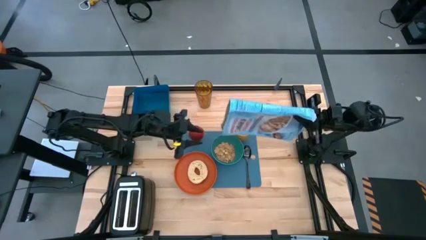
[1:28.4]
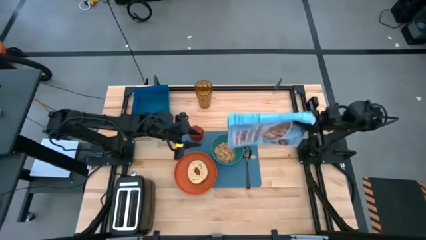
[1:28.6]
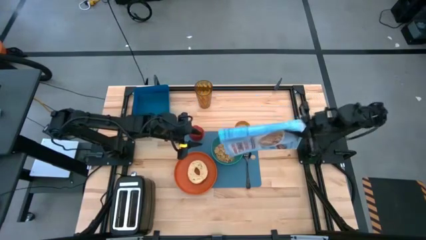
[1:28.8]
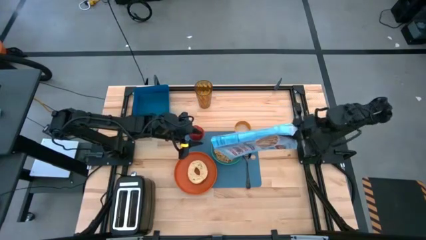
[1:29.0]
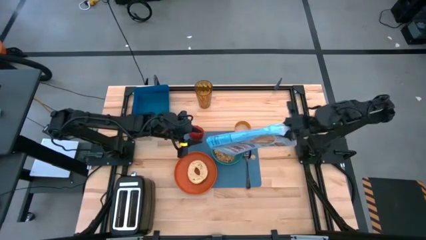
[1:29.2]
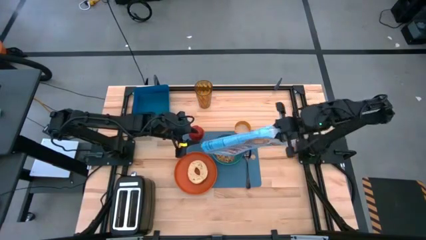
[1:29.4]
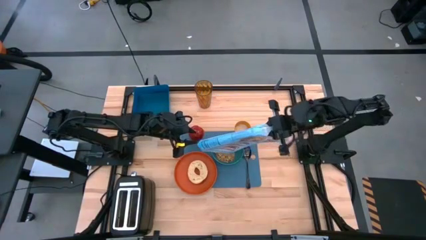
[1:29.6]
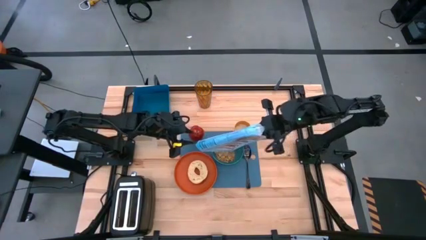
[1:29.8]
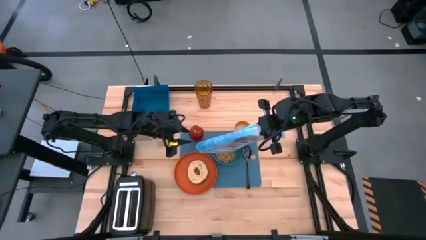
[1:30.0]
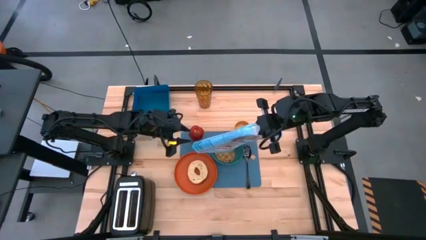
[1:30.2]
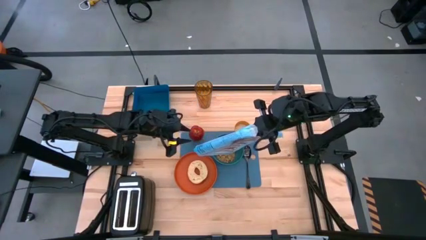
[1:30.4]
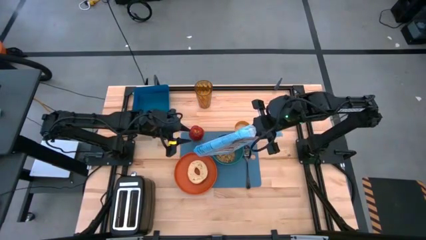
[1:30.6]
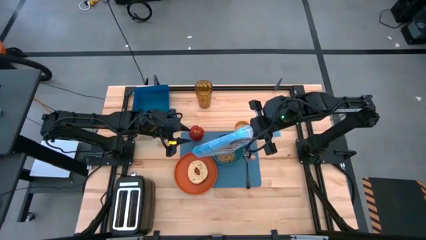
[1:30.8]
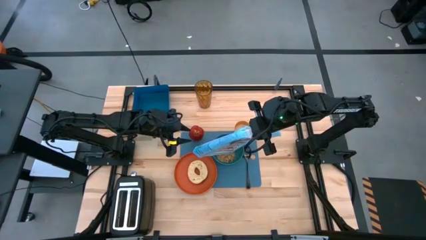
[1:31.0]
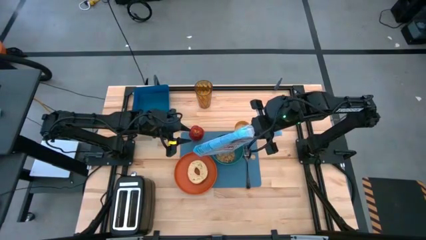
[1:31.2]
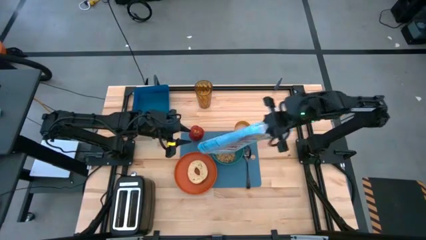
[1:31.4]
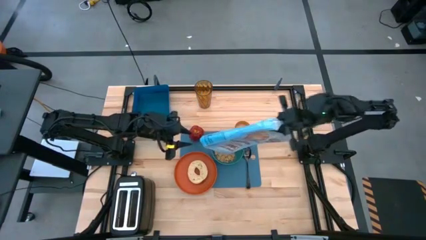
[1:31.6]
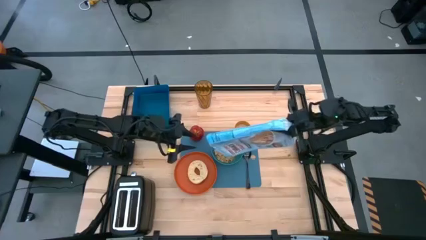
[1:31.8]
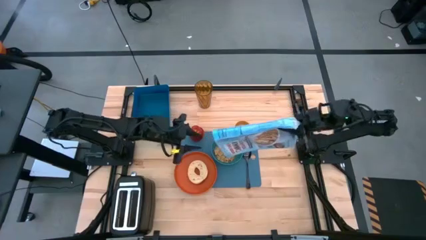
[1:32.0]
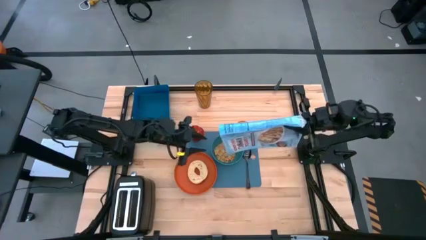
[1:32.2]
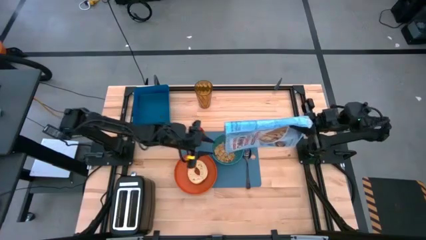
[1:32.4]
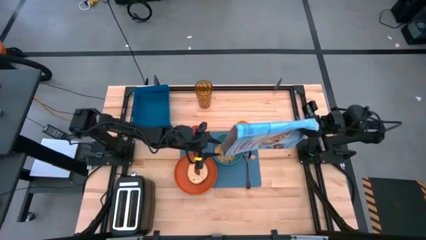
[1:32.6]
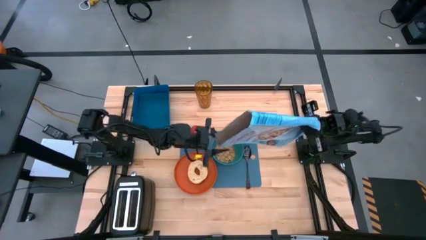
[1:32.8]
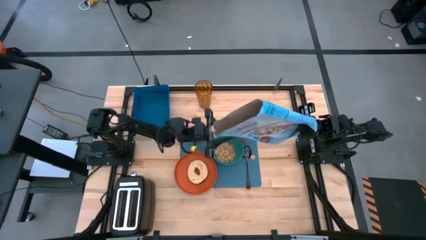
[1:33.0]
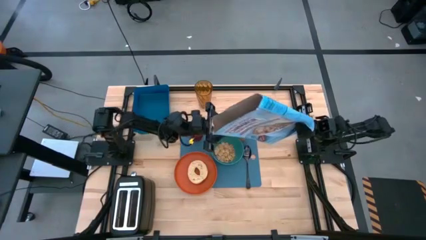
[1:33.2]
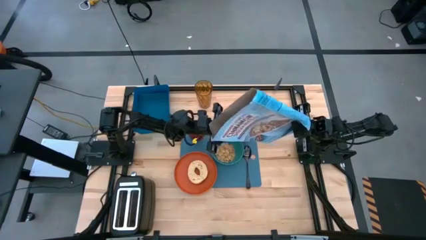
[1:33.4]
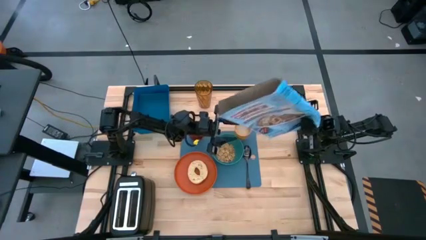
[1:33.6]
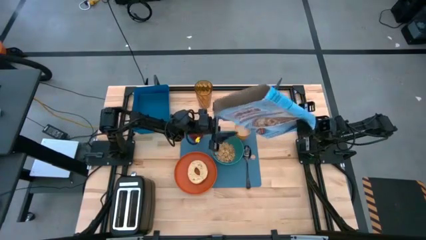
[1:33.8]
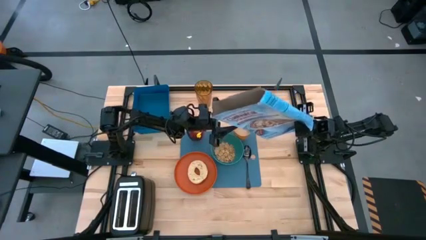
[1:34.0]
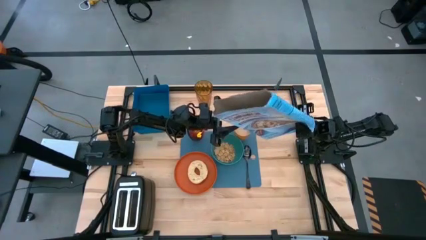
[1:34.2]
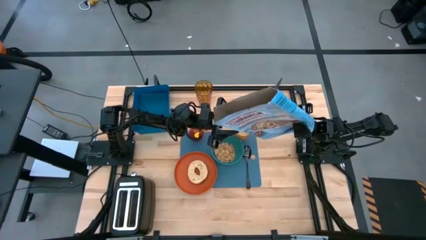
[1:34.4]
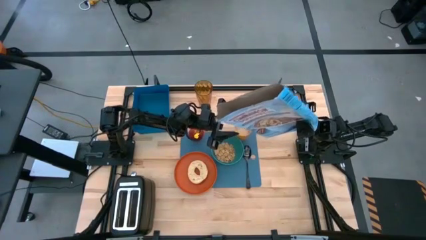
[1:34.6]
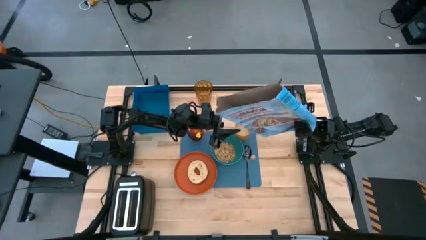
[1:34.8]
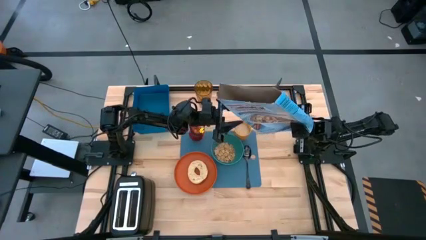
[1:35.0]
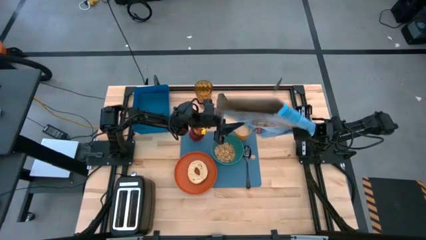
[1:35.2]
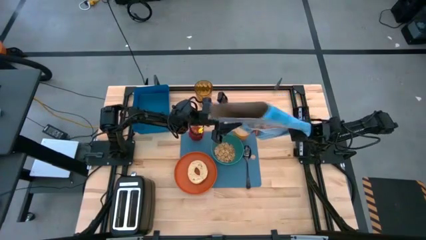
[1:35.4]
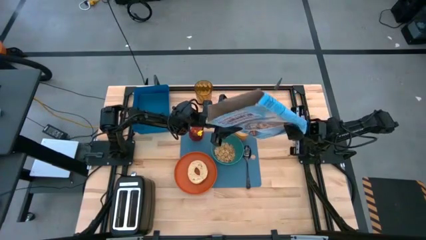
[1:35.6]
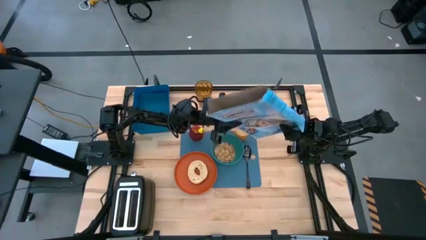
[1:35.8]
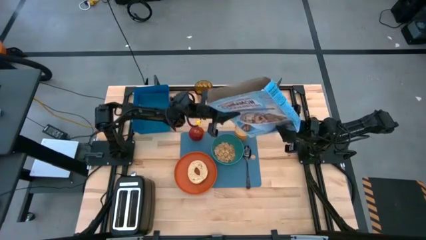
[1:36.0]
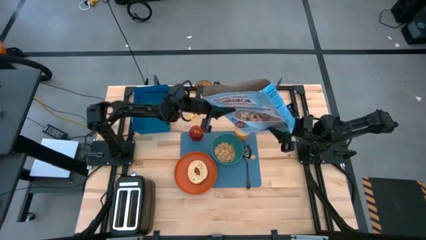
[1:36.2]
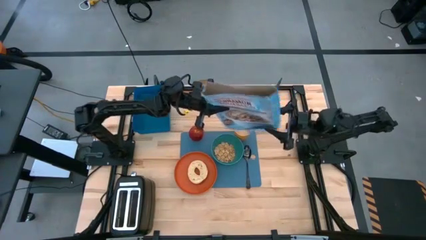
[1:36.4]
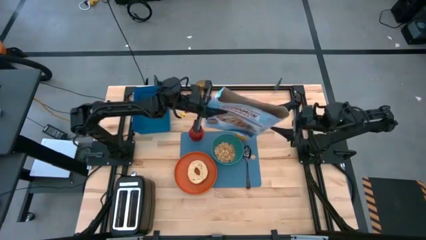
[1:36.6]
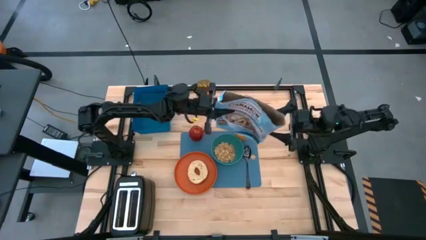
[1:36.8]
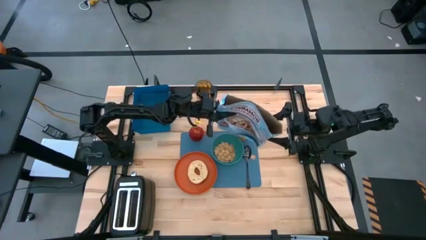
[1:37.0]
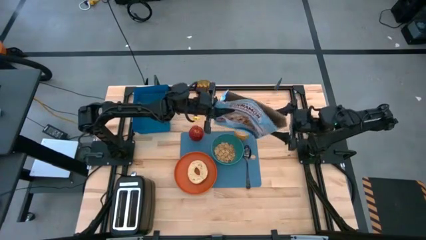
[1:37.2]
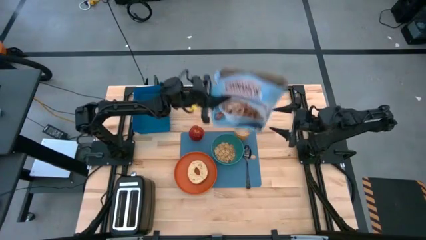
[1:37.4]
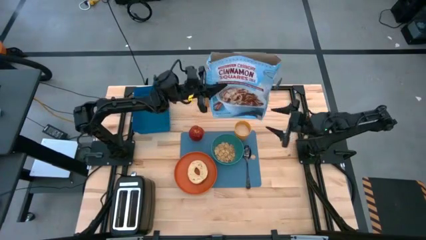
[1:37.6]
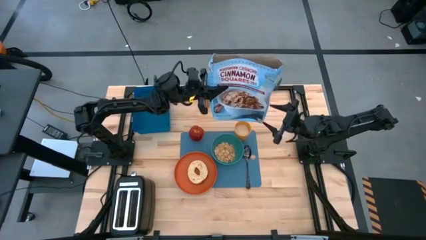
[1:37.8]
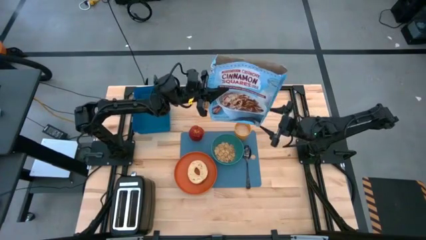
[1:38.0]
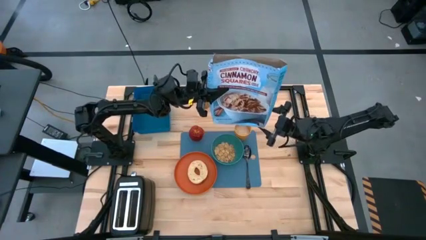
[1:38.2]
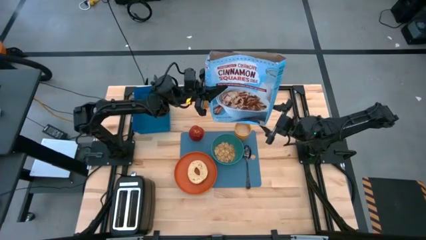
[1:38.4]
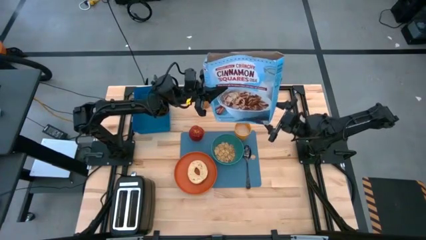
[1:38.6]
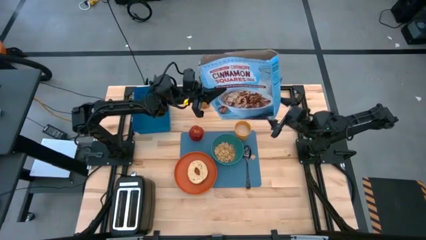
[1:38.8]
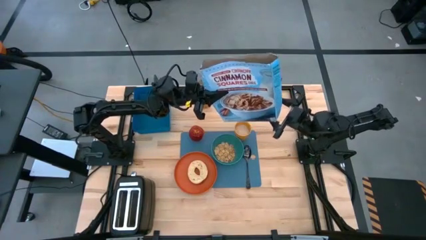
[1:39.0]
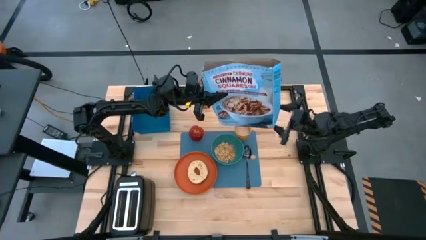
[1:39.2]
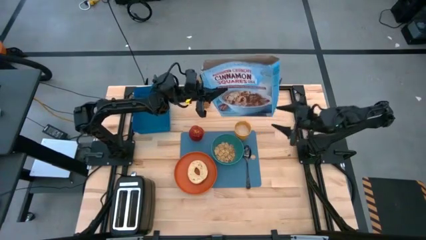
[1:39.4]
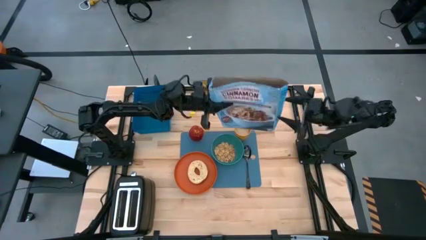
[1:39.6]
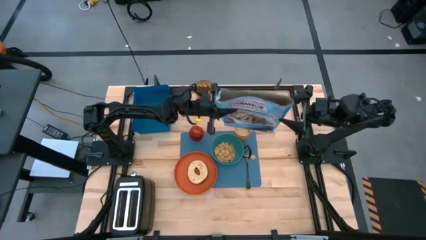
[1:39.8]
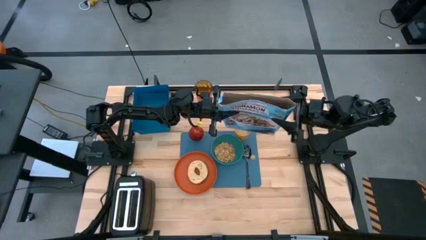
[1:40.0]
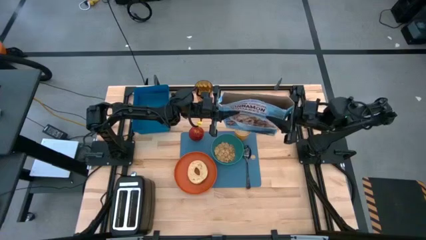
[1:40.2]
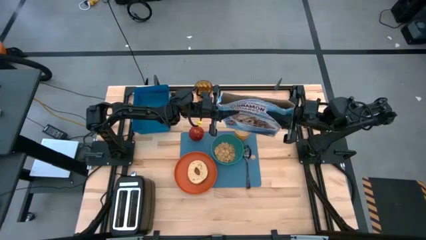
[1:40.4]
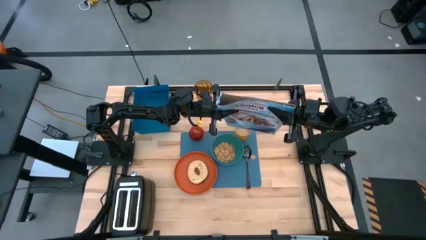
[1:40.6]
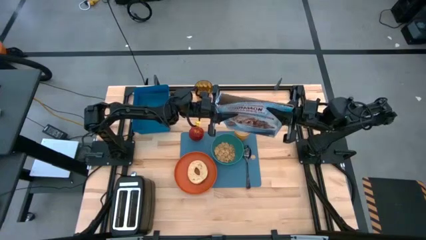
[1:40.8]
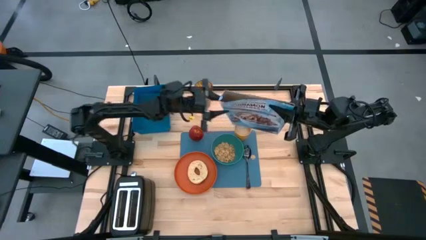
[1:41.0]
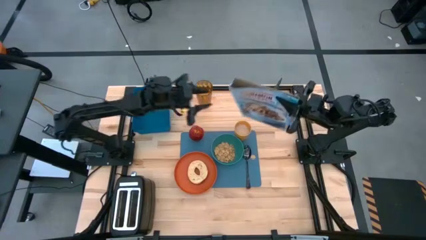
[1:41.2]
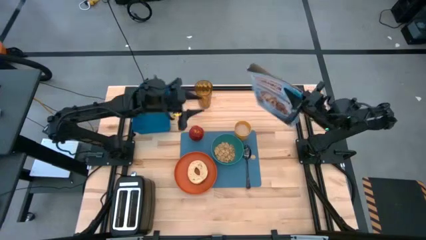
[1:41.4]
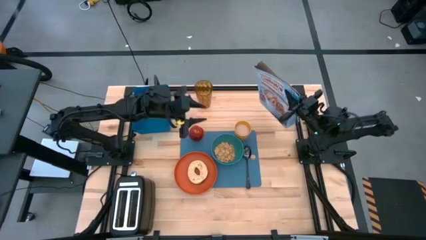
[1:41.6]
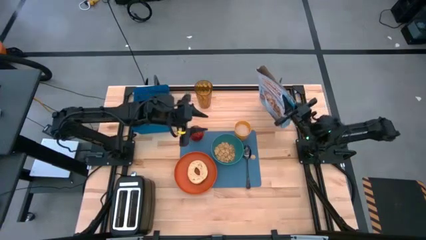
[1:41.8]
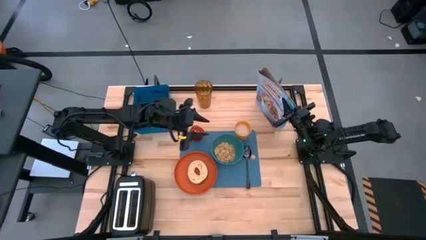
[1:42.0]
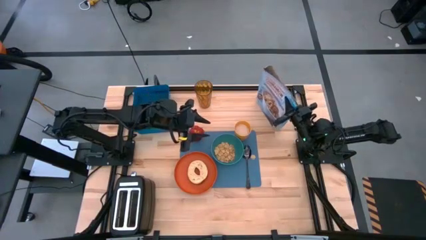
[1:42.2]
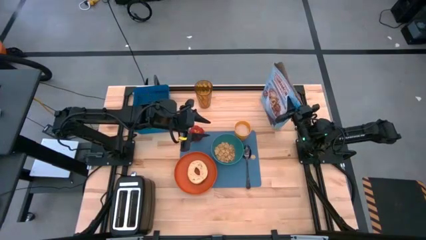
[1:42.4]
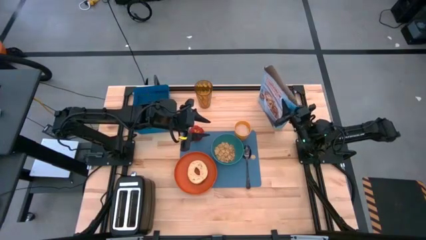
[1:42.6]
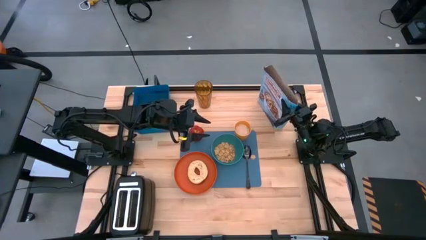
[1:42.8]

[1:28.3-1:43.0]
Task: Arrange a breakfast setting
Pour the cereal into the green bowl

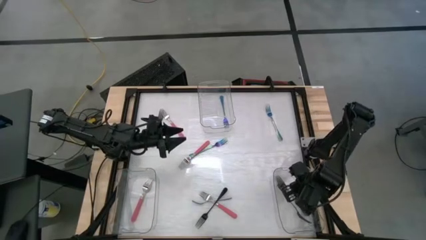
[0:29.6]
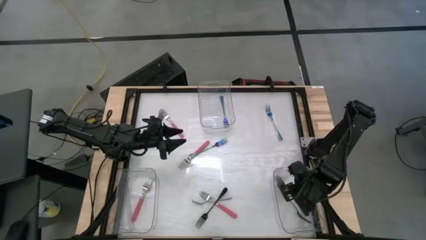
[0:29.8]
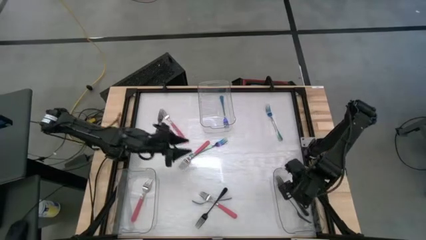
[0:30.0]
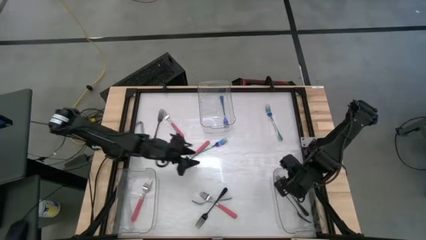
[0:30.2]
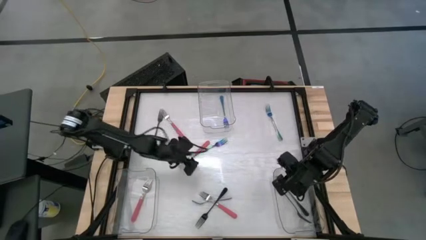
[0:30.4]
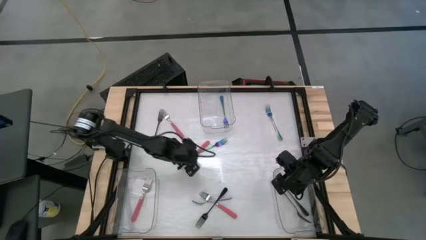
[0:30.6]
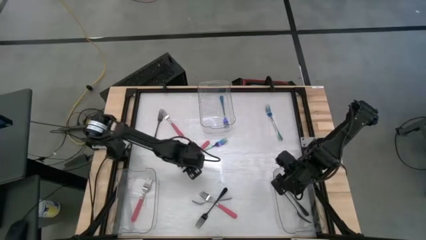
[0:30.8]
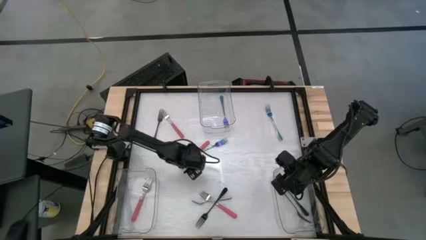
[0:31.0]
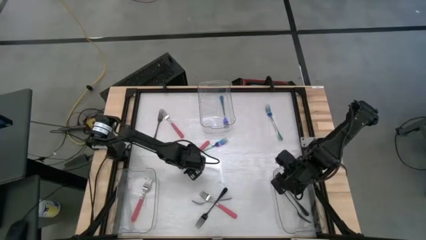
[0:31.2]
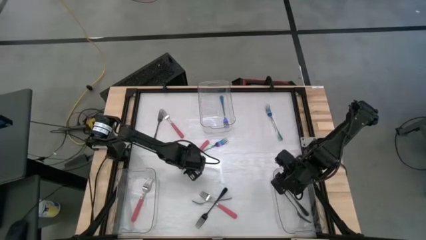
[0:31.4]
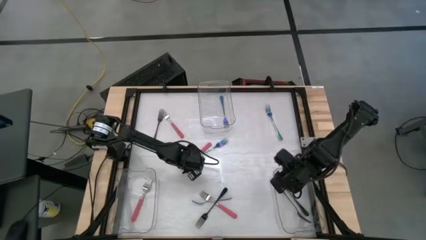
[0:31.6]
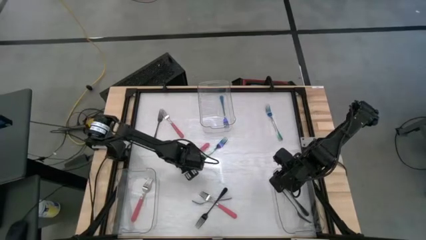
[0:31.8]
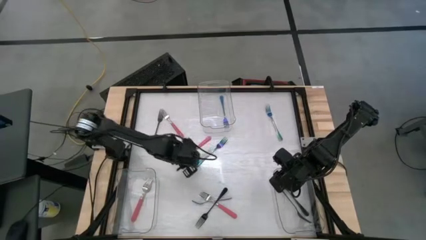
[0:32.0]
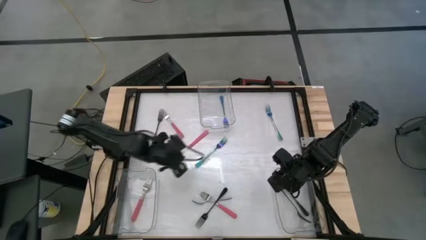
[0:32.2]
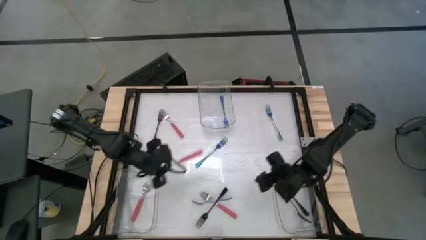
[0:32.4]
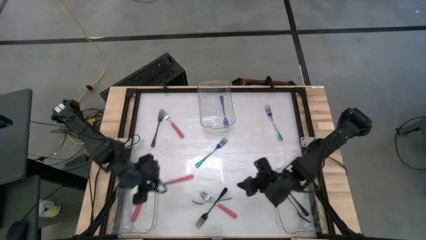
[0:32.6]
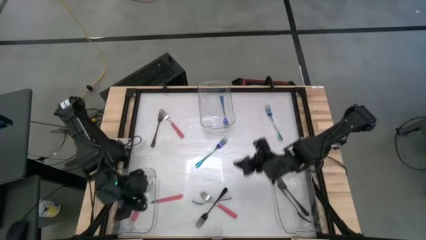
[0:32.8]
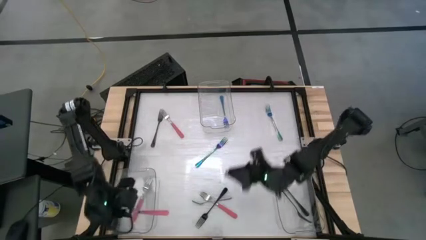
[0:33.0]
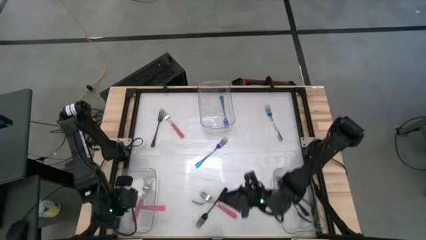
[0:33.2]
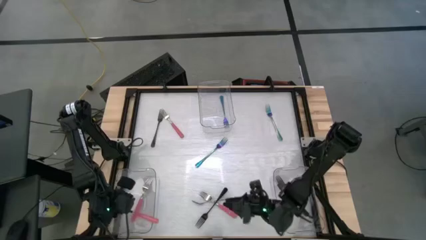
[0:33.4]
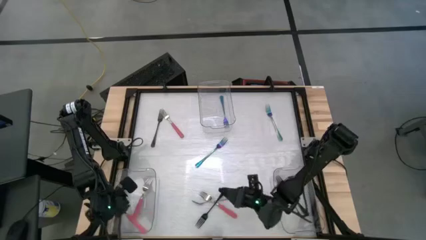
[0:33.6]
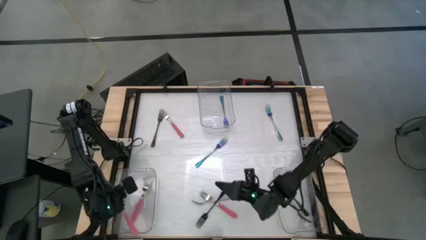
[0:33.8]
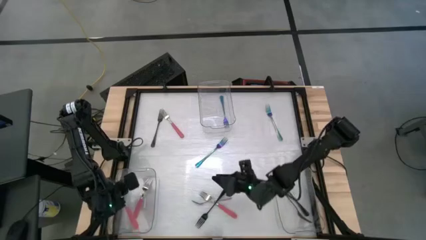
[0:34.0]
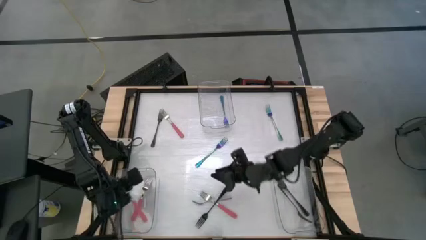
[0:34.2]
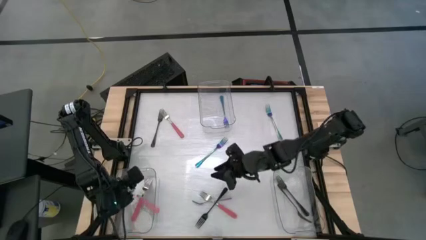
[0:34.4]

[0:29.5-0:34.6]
Task: Sort silverware by color (type)
Put the pink fork into the bottom left transparent bin
